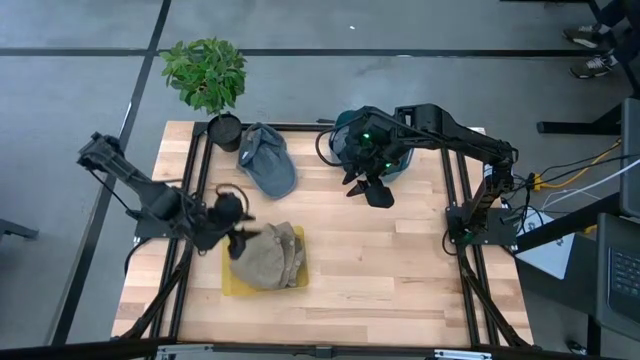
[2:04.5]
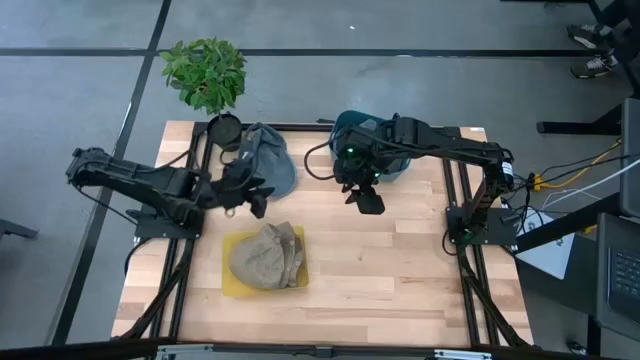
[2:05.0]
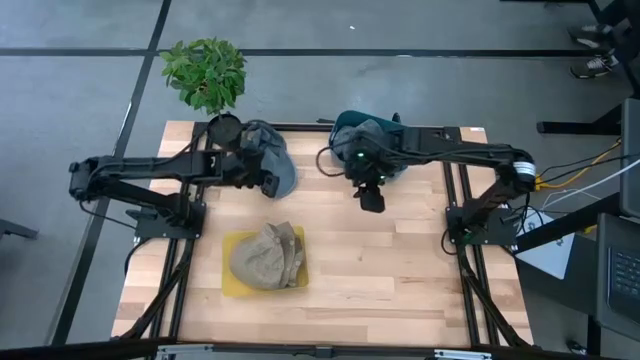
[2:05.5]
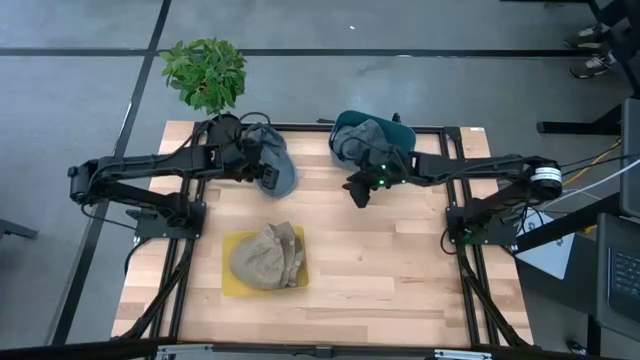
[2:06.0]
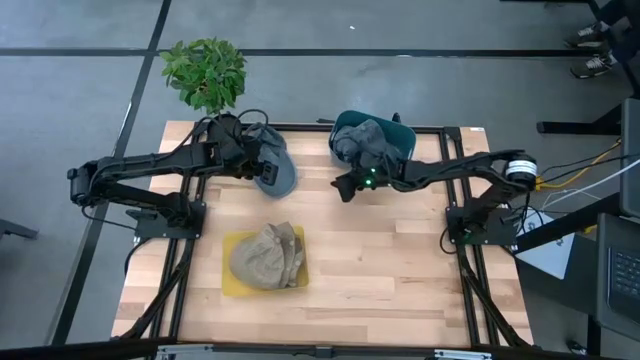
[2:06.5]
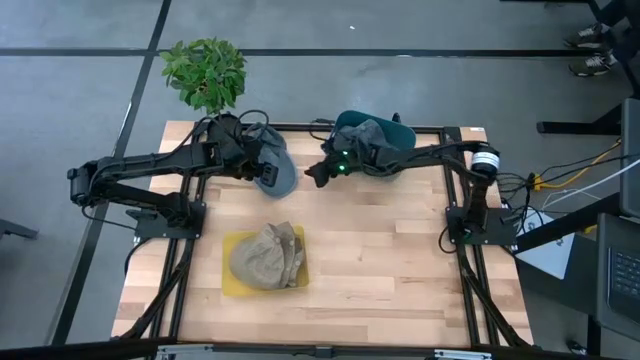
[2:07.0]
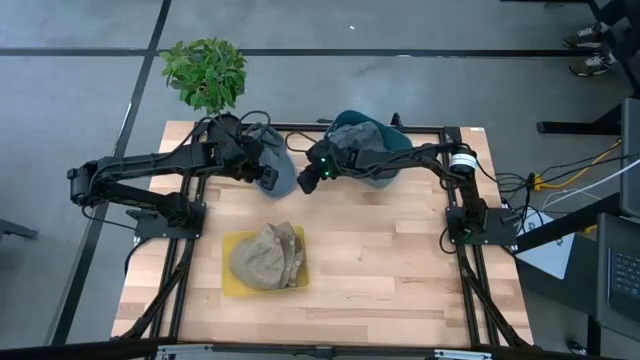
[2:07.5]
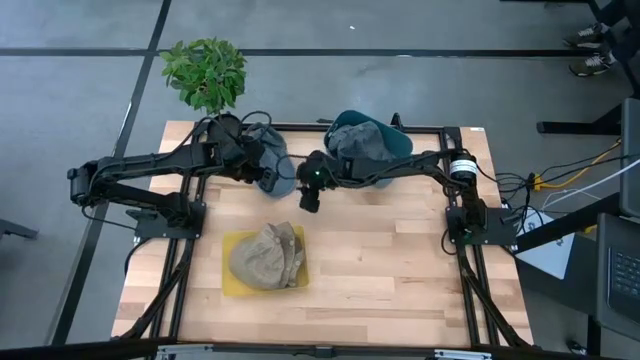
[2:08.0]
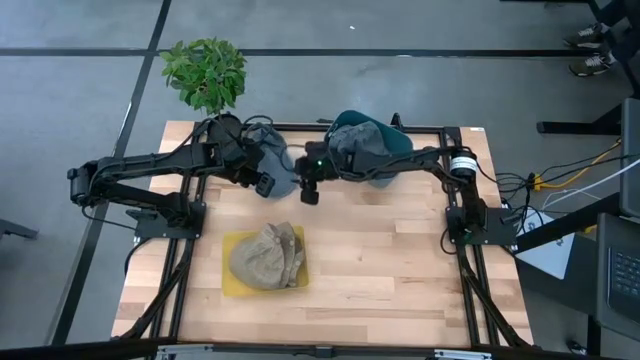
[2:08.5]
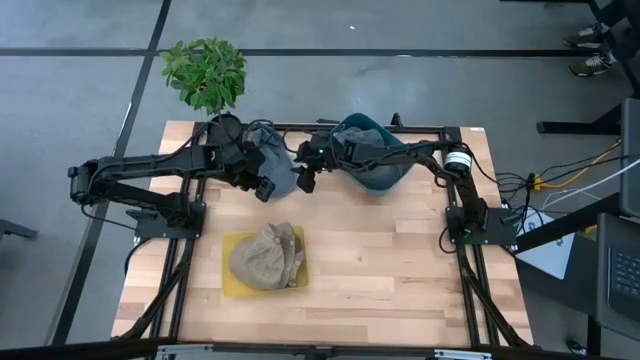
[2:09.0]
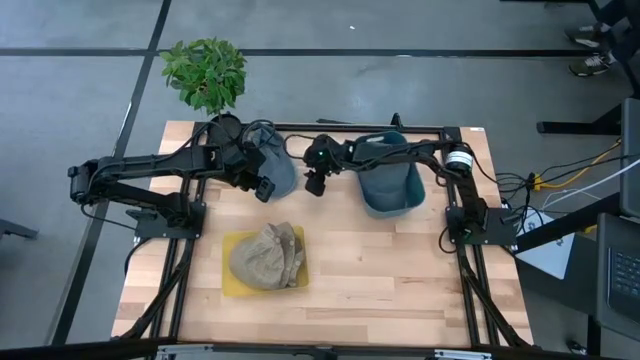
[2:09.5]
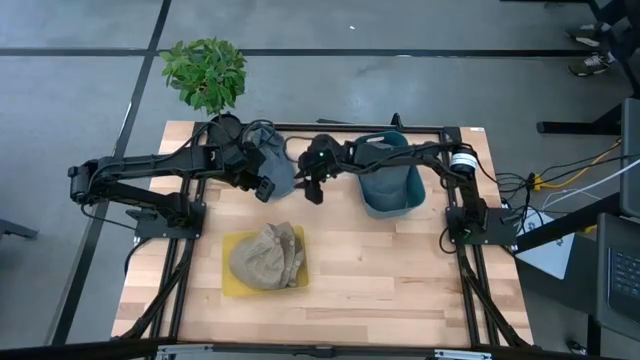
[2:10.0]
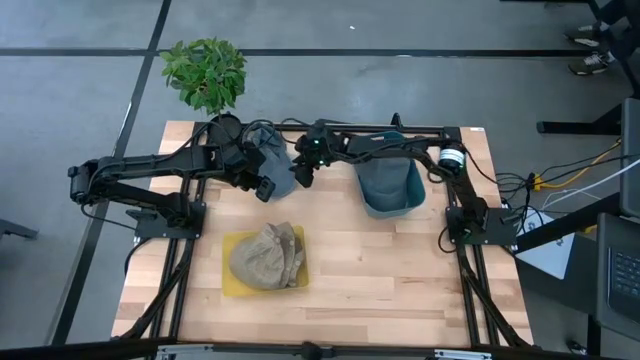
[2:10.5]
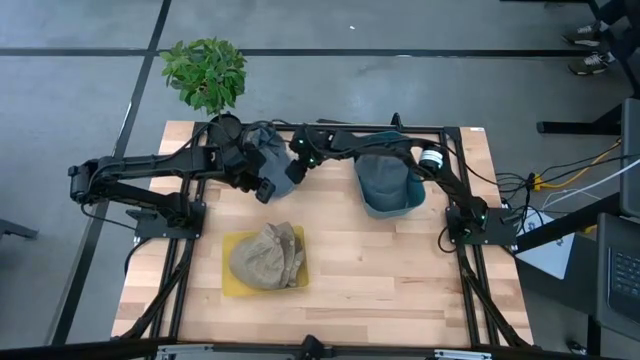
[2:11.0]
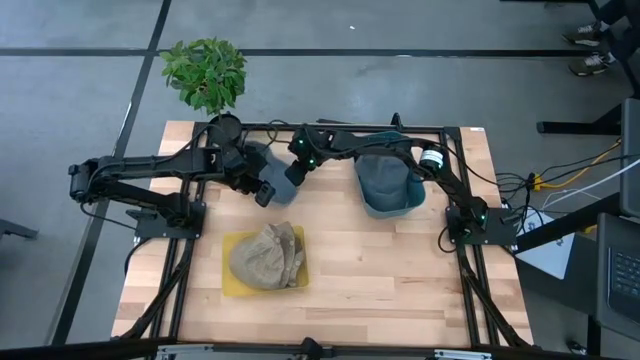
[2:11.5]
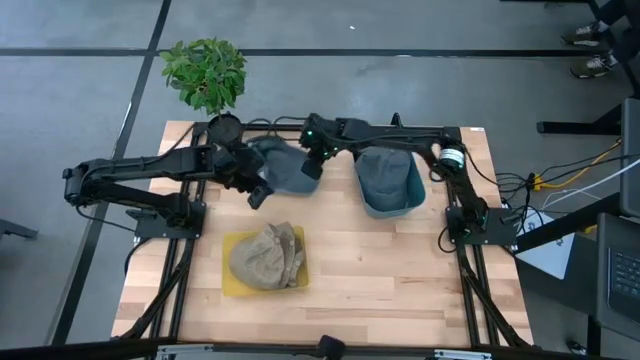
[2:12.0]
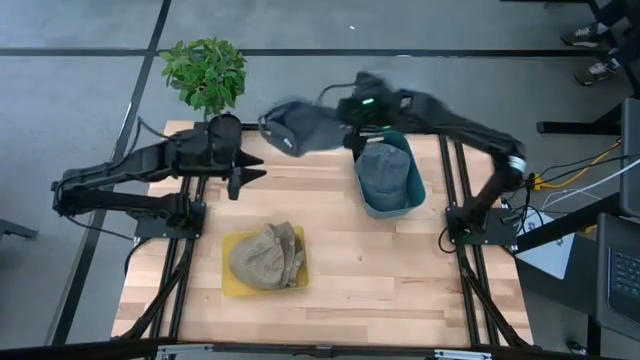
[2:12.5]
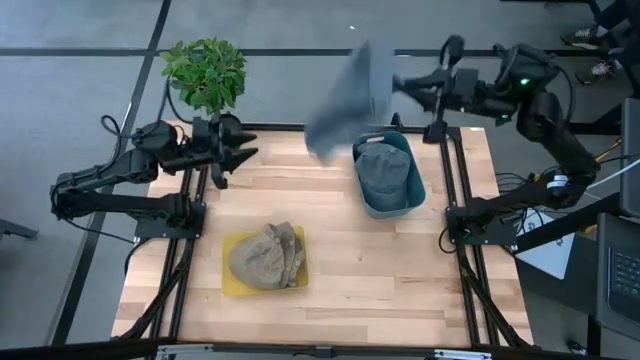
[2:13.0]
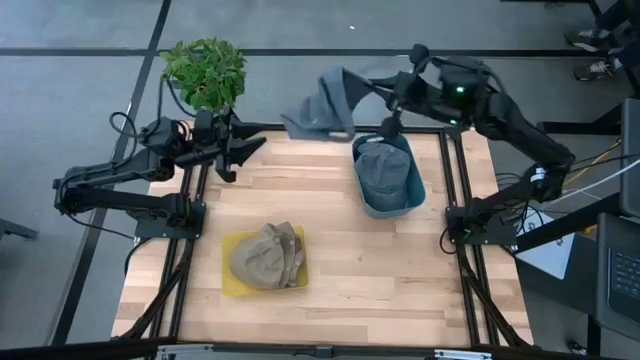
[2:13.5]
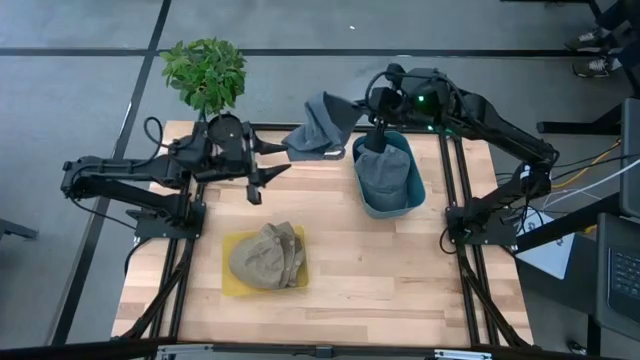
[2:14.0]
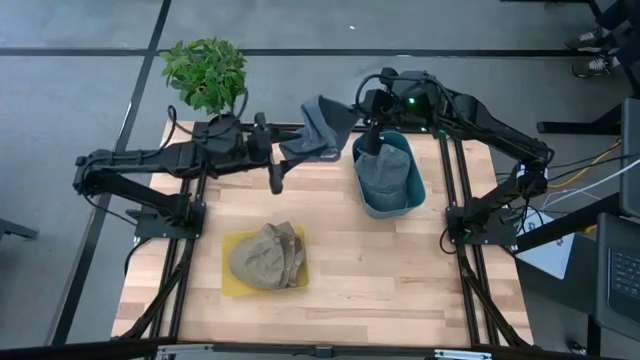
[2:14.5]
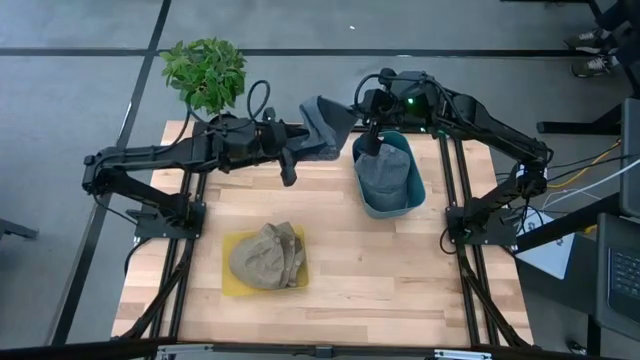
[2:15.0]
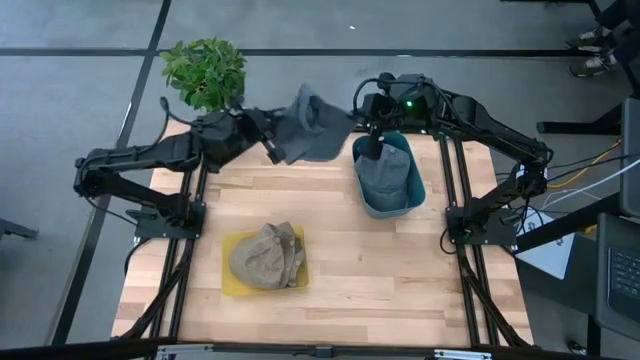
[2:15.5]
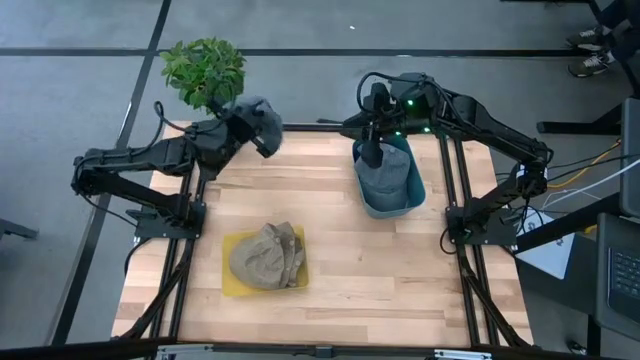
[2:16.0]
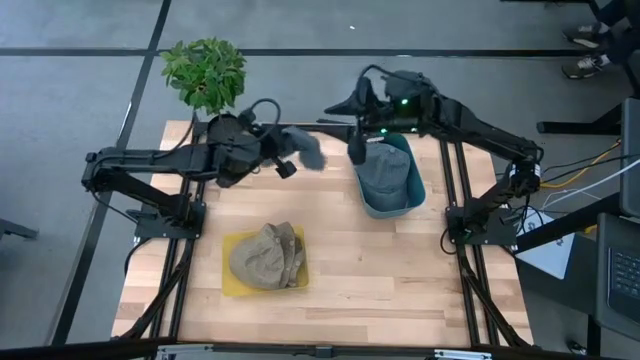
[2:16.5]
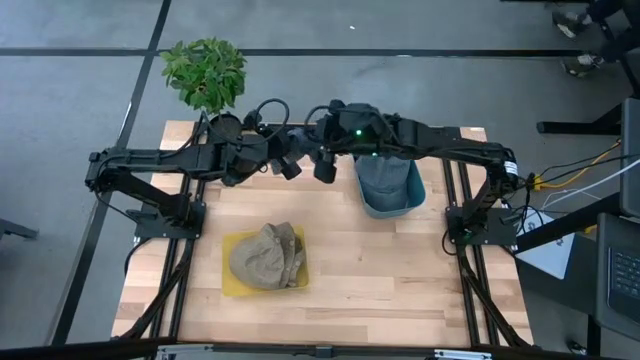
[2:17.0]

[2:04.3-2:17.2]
Task: Pick & Place hat
Put the gray cap into the blue bin

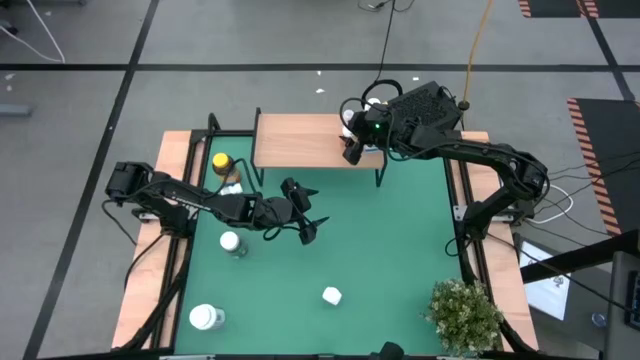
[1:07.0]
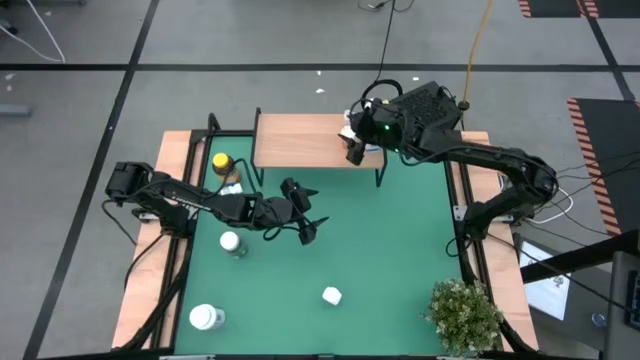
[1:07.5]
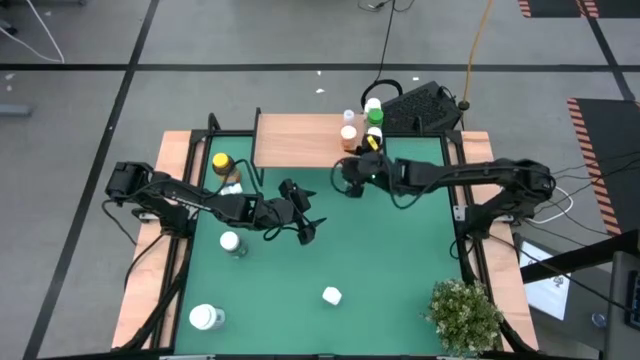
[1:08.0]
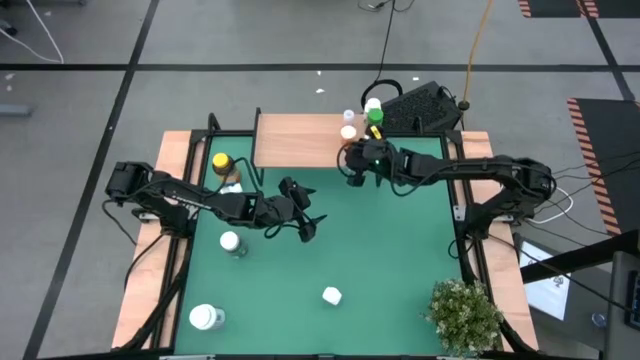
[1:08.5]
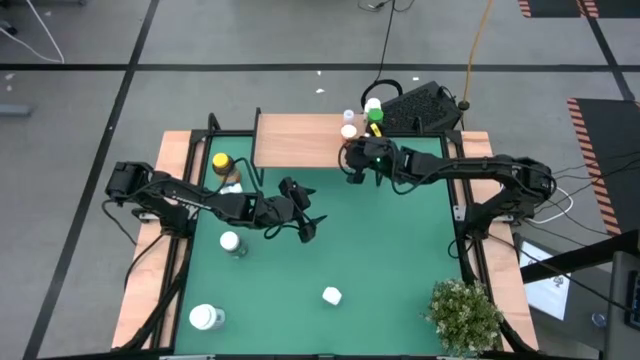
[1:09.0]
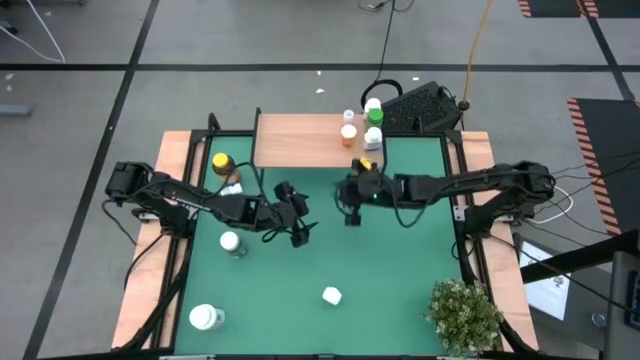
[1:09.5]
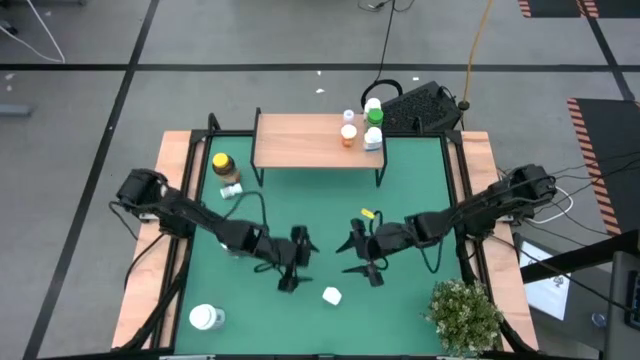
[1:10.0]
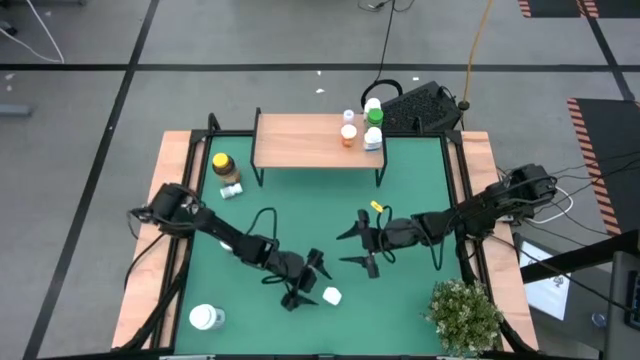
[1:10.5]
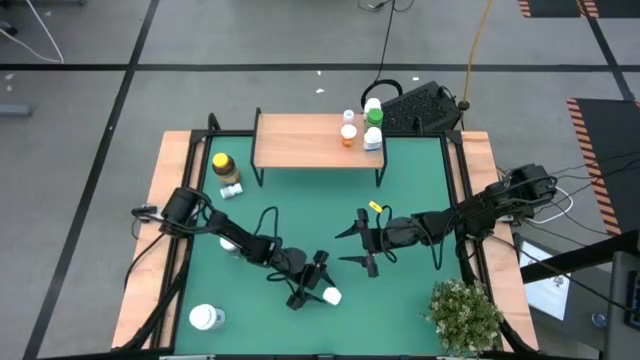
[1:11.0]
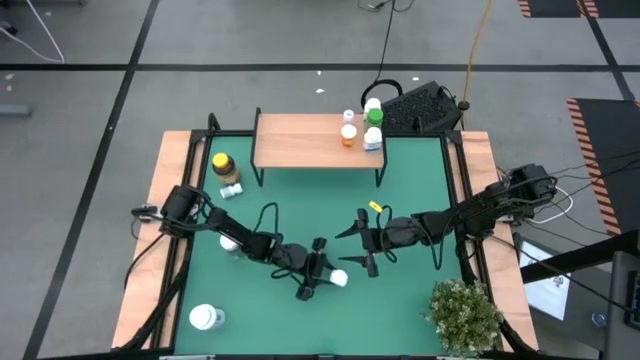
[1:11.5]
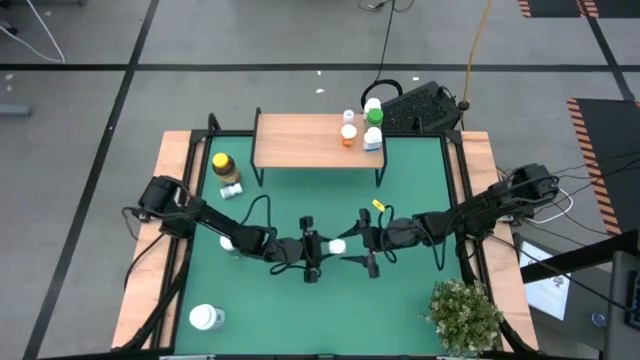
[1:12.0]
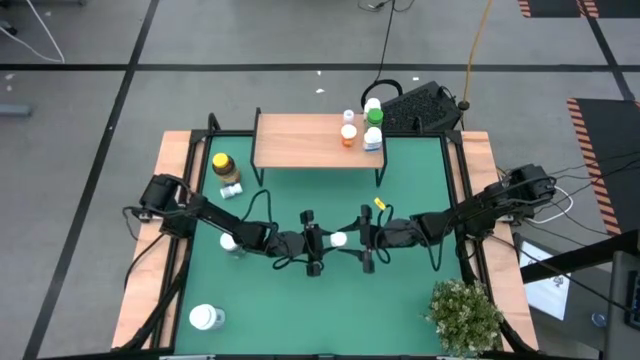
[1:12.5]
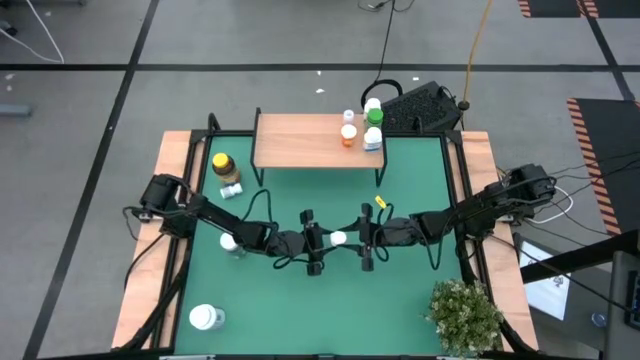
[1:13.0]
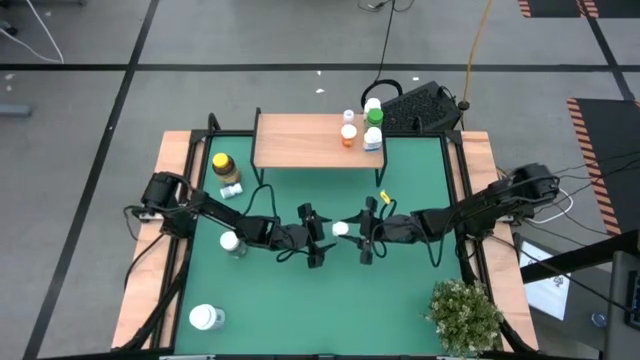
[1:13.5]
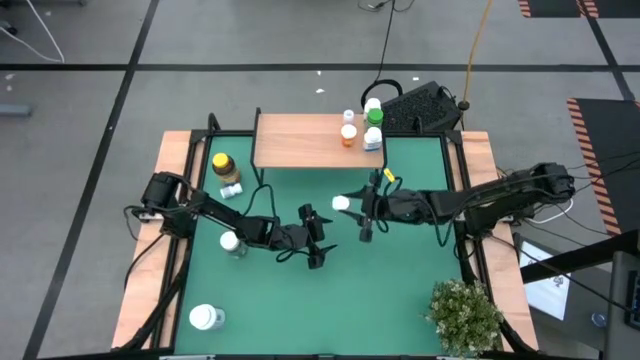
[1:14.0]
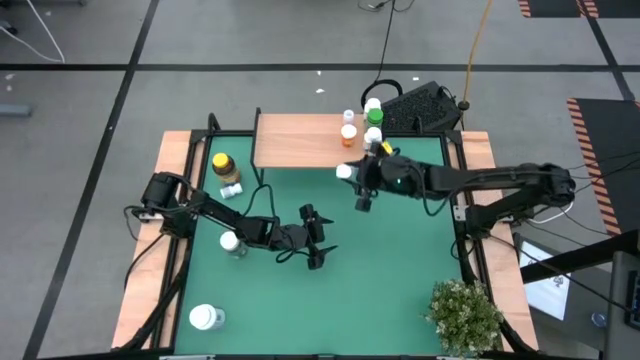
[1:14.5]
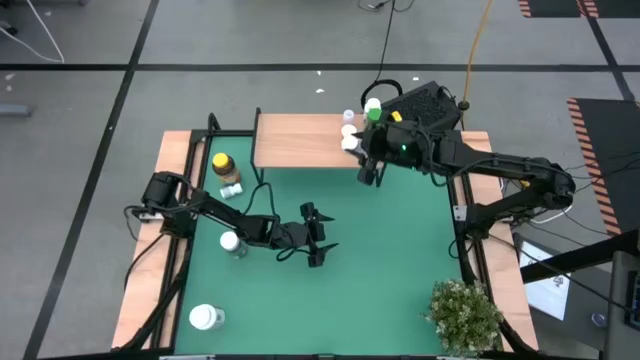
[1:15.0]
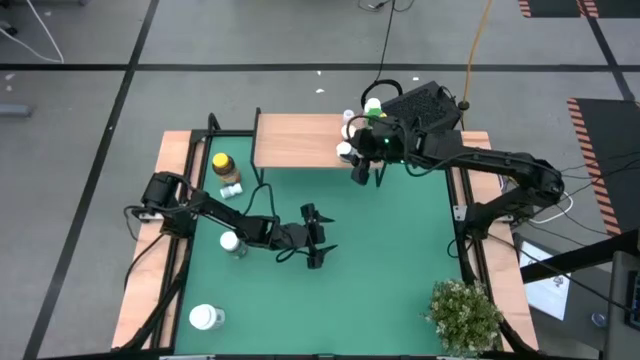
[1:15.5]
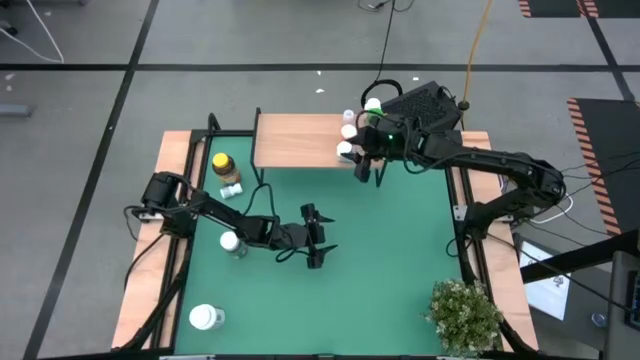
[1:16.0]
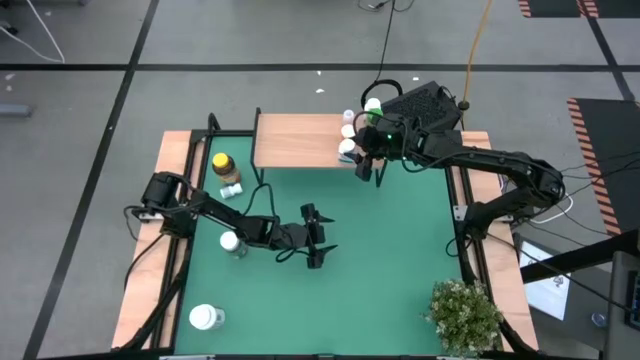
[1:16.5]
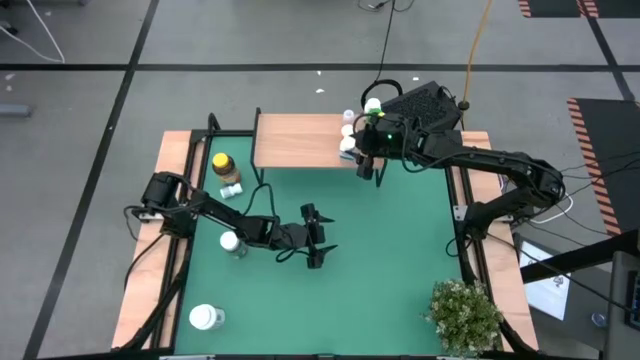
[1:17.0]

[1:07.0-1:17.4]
Task: Pick and place medicine bottles onto shelf by color
Put the bottom small white medicine bottle on the shelf
